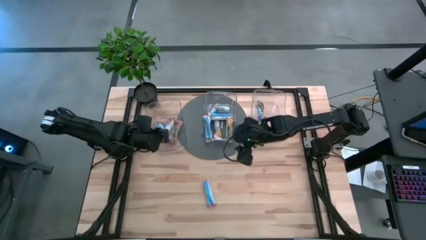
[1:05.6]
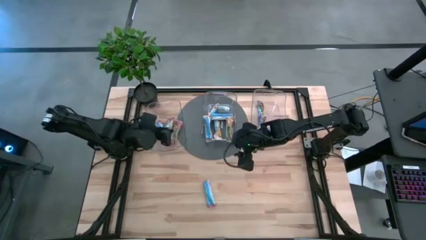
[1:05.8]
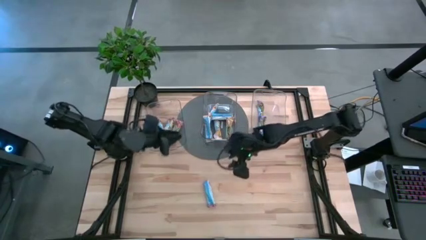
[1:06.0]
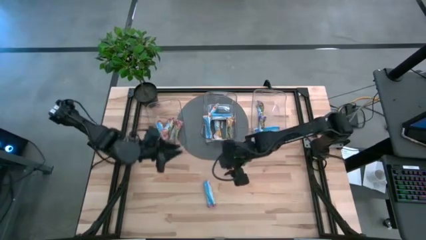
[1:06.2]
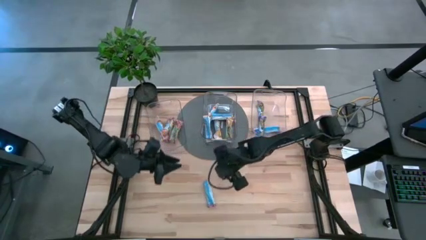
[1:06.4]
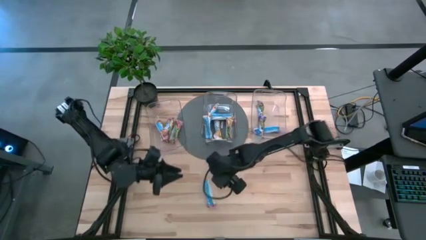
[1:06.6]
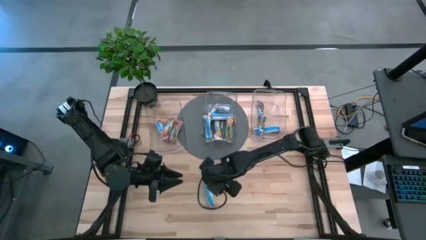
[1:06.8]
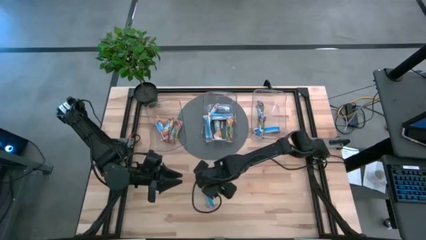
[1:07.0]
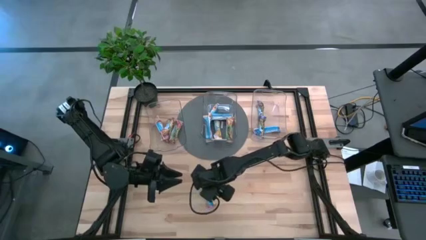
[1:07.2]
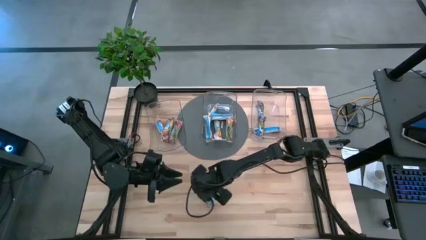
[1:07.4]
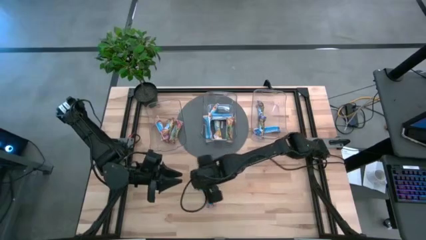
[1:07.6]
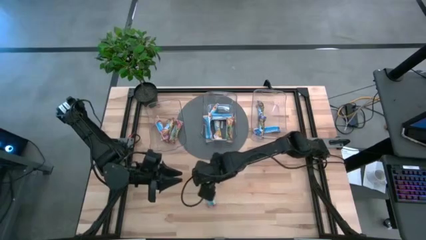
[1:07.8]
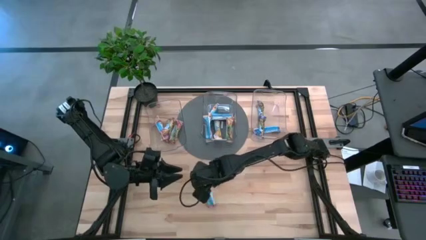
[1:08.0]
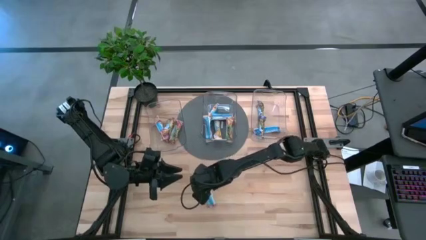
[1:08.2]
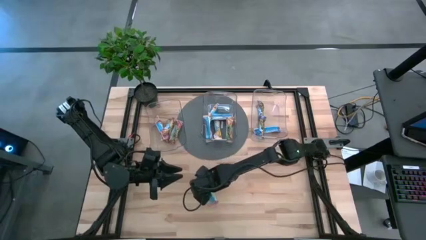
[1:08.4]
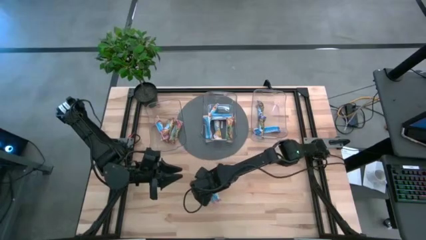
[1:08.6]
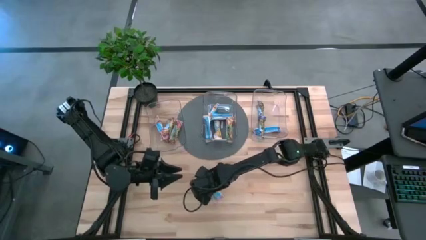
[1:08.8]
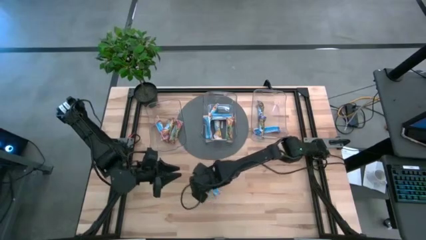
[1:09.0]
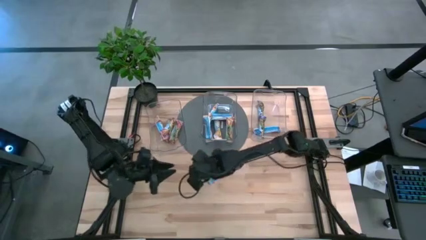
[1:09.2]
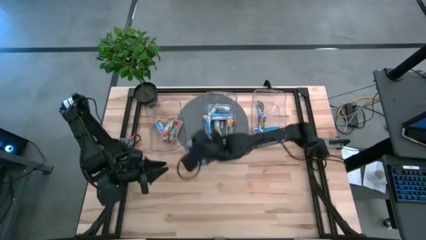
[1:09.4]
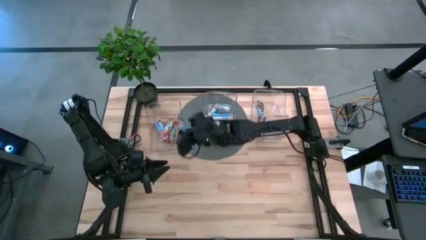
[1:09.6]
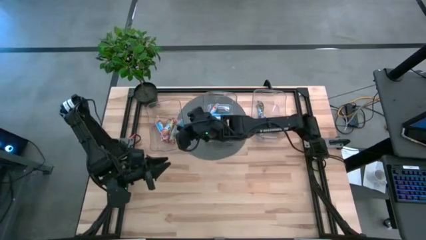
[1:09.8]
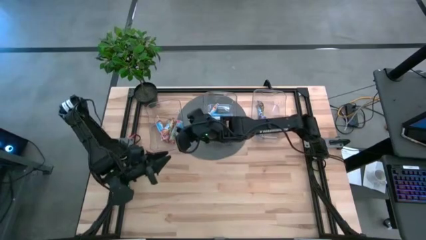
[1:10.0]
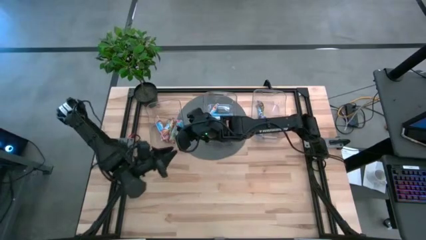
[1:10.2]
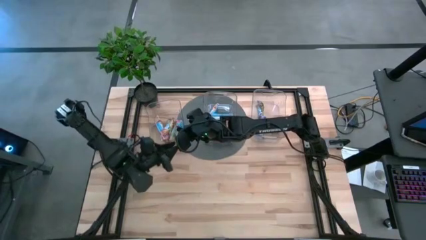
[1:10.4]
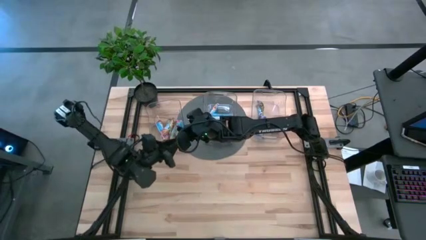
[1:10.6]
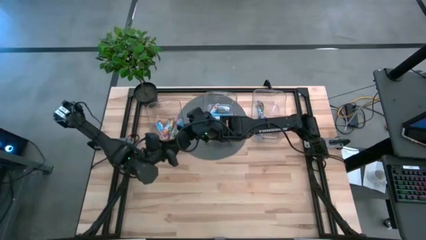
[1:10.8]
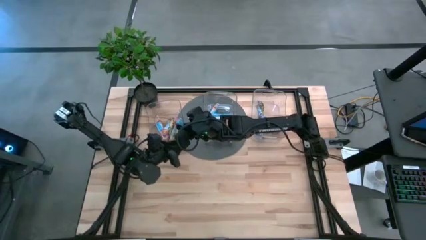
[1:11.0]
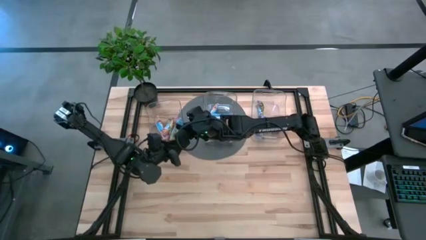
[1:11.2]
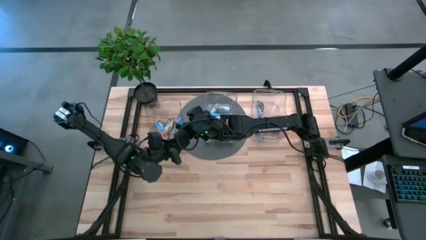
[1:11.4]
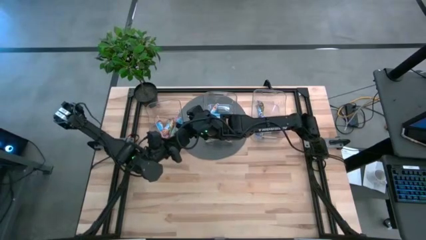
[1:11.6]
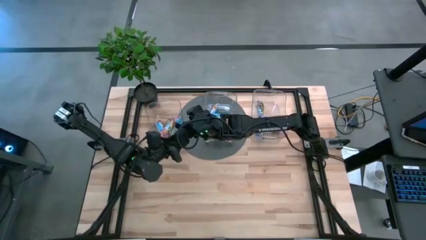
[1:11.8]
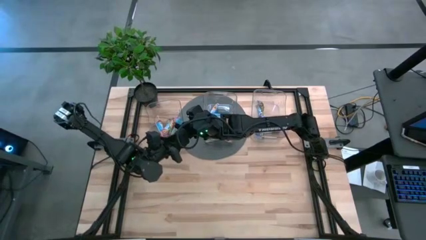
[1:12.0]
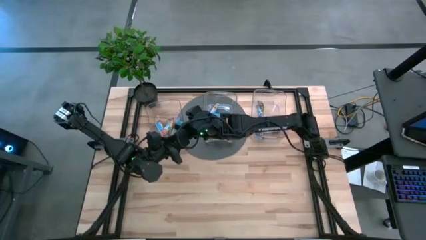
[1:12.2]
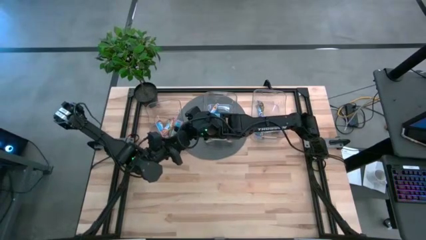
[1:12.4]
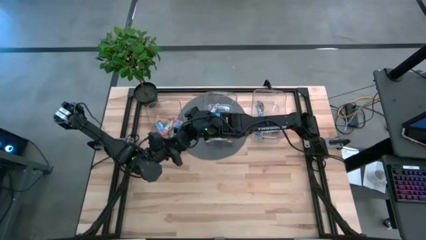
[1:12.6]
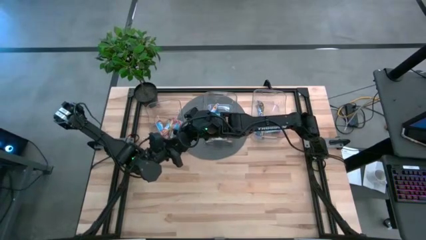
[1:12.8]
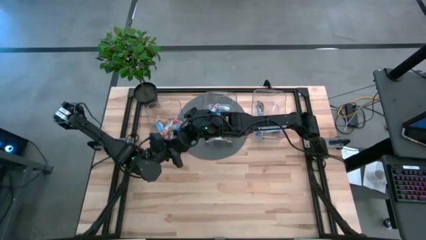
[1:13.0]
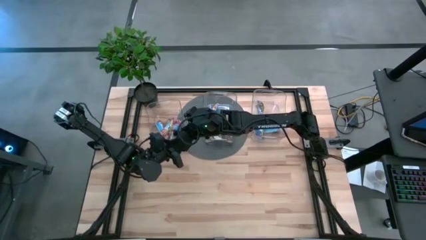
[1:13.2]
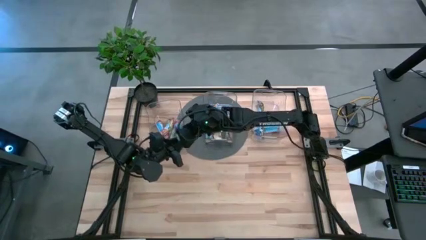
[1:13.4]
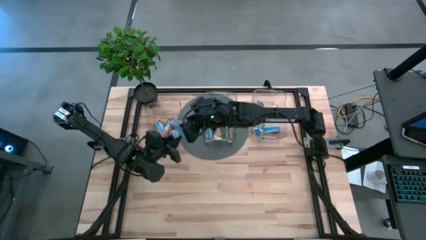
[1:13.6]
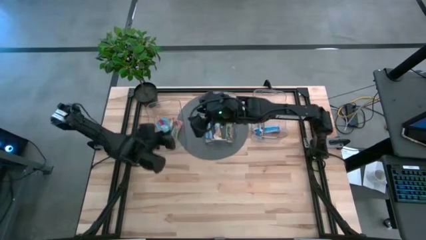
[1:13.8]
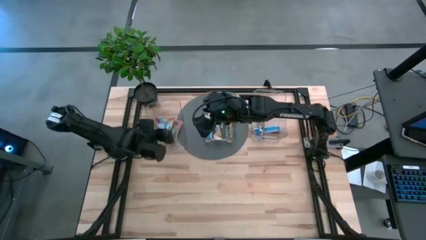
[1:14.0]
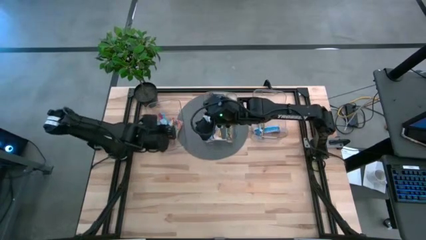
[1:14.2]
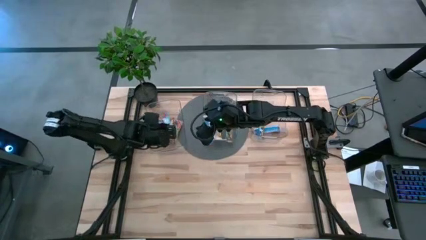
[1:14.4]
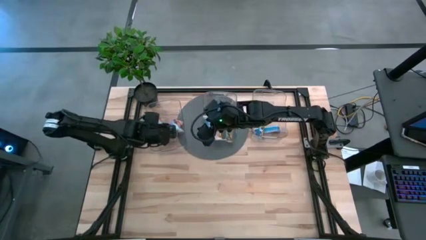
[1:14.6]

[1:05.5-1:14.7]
Task: Pick and place Granola Bars by type
Put the red granola bar into the left transparent bin

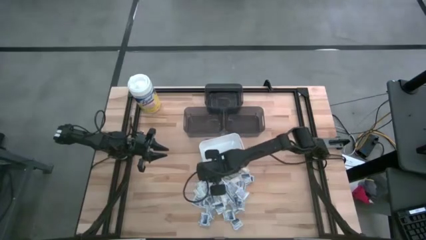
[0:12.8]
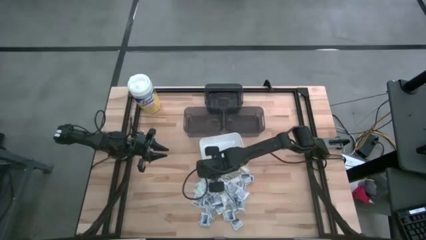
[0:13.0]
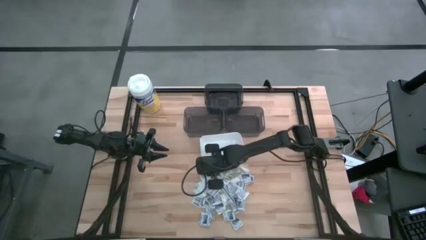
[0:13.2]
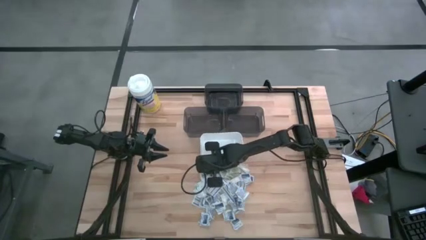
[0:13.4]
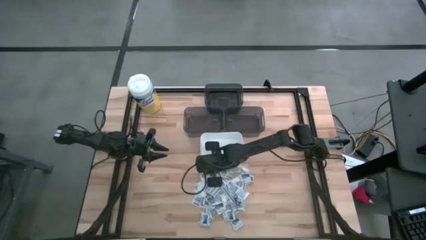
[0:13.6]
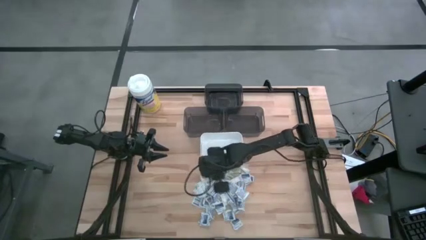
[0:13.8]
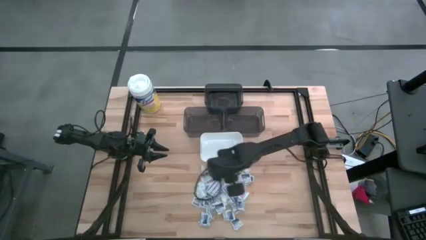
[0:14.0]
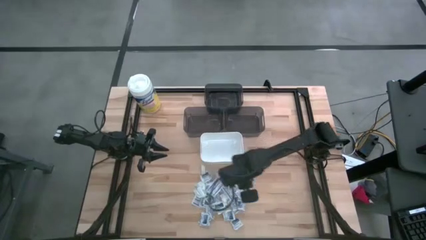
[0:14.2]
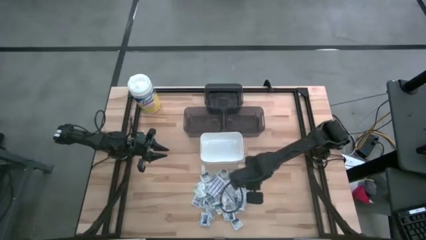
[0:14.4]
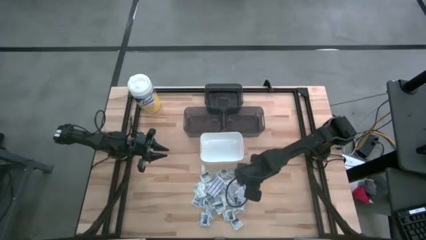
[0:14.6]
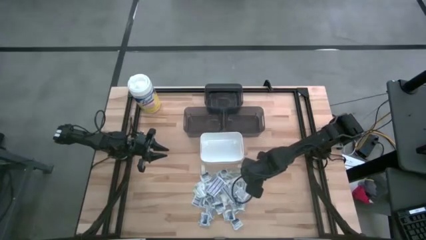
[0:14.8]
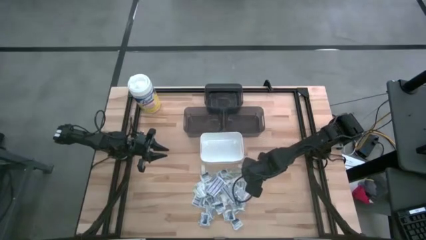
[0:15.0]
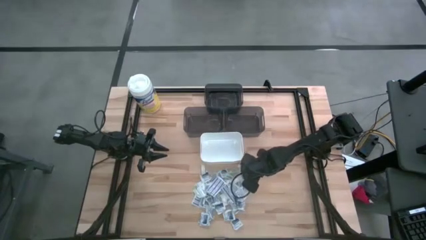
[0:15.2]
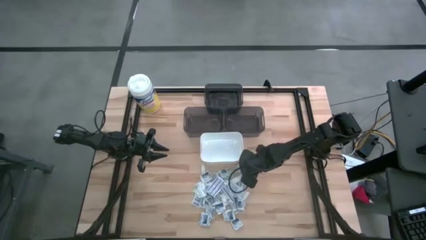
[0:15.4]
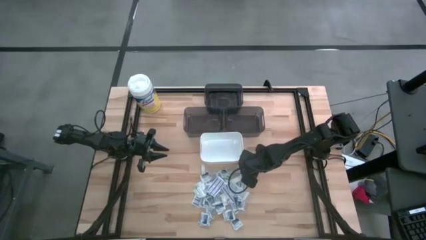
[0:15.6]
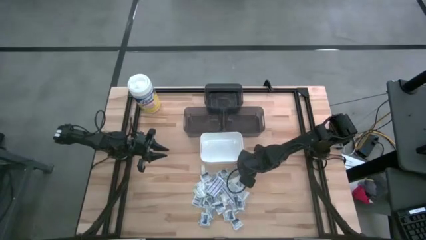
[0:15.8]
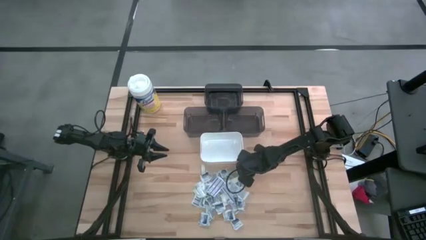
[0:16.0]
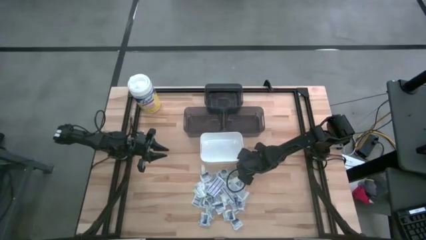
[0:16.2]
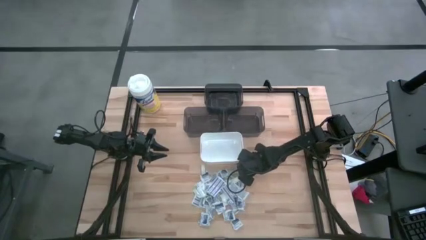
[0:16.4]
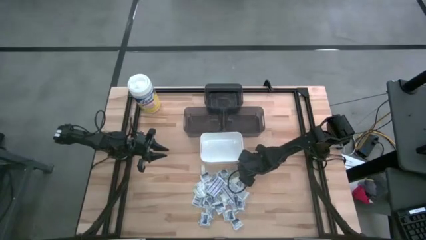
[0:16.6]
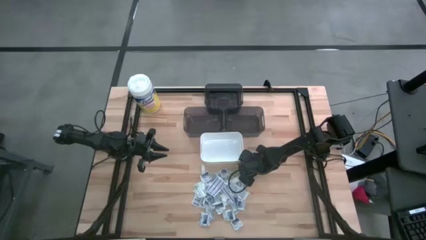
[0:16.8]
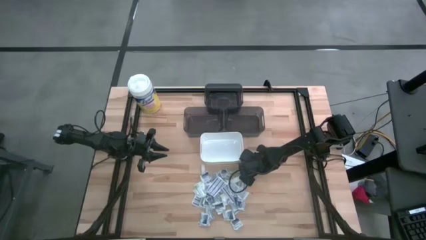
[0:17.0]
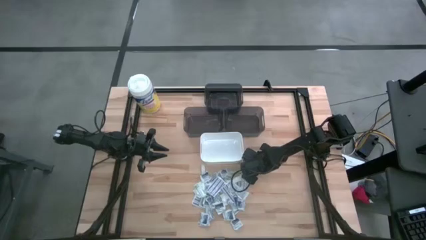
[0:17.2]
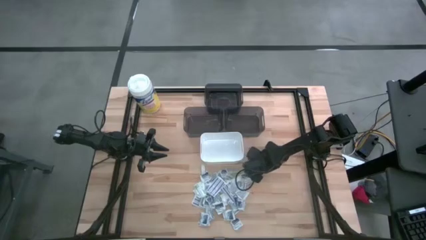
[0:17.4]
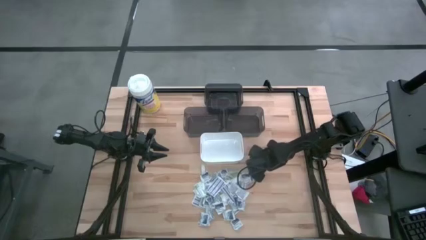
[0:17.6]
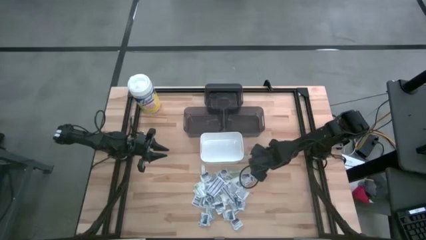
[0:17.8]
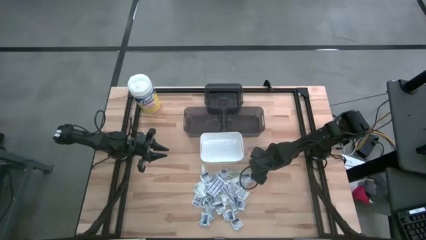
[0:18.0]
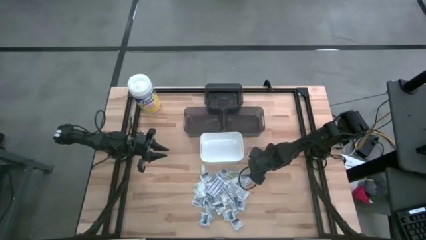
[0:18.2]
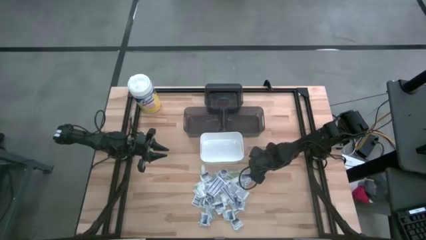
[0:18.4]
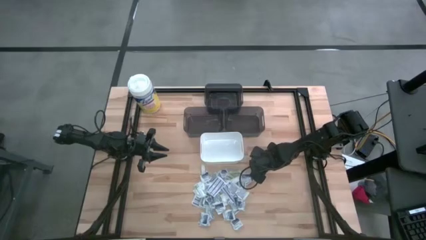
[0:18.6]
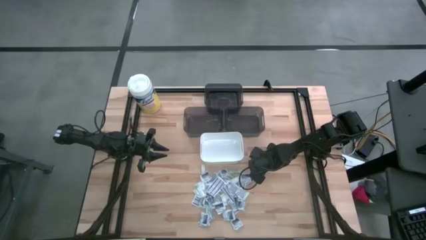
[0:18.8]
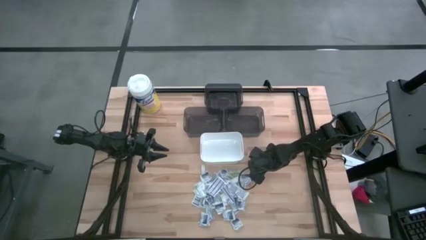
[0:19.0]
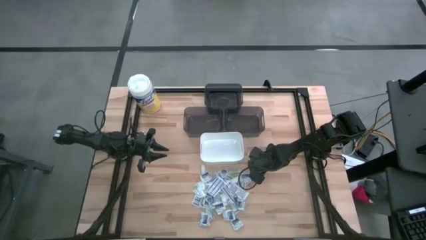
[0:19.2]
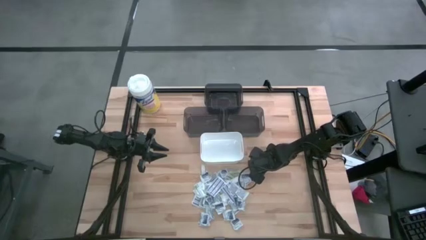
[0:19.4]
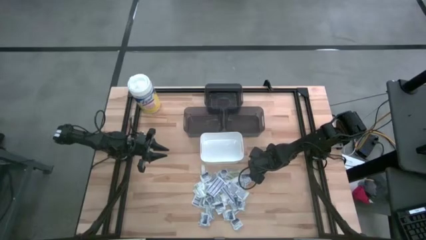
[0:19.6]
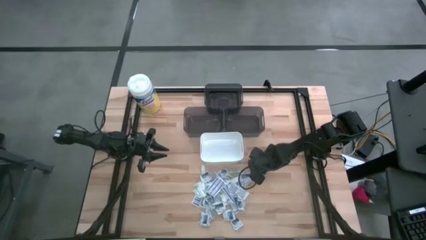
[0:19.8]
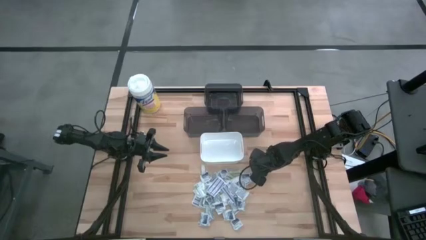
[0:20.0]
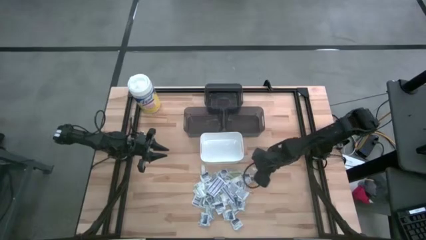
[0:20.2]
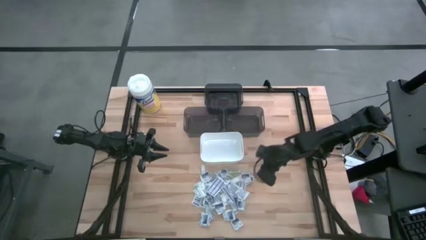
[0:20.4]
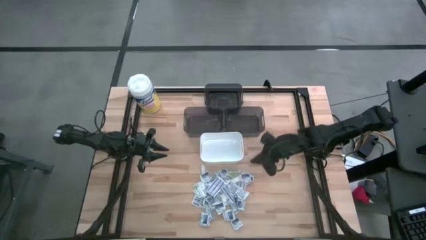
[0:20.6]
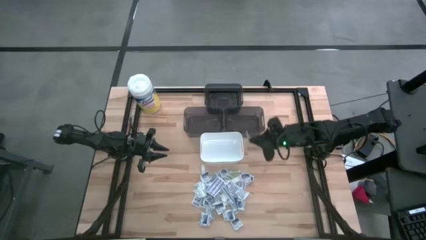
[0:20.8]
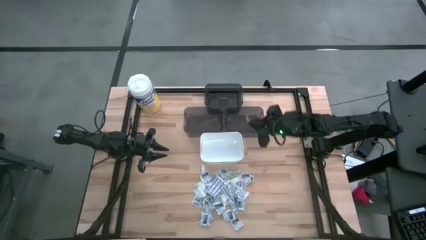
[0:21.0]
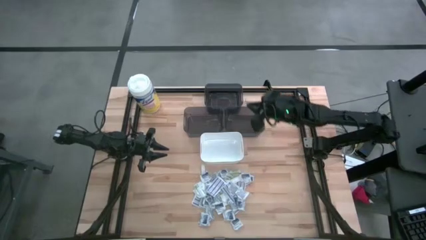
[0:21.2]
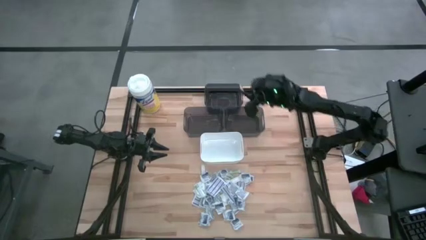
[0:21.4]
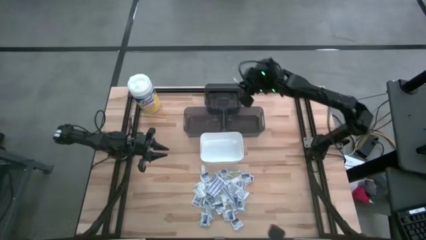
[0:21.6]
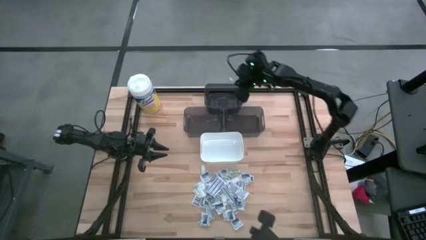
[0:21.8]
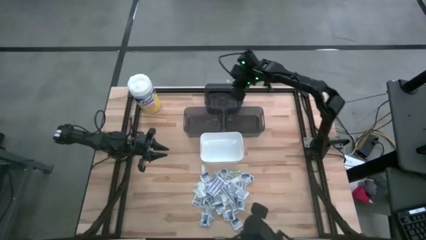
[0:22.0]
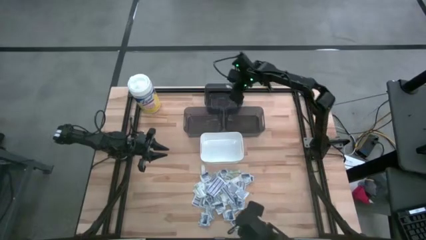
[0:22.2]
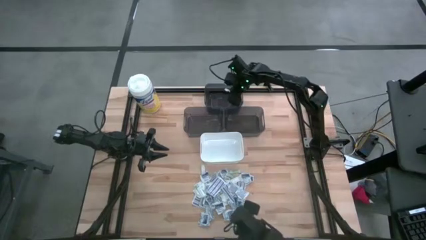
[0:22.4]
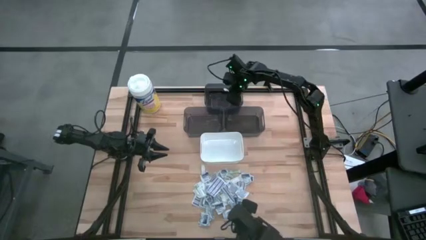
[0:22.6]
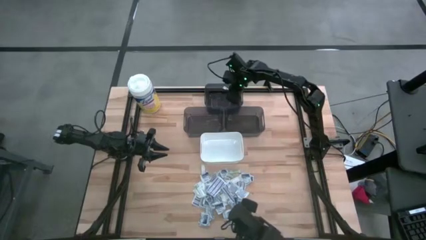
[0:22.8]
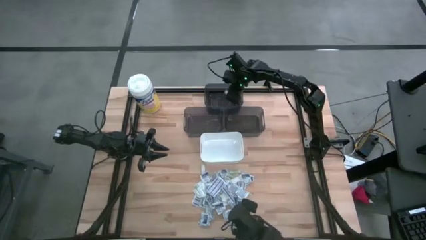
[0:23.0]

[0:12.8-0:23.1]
Task: Pick & Place First Aid Supplies
Put the green bandage into the top black bin
